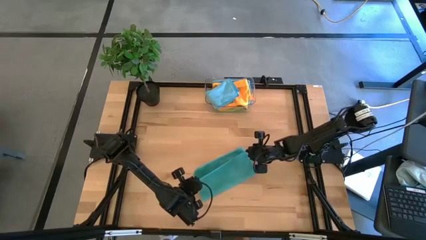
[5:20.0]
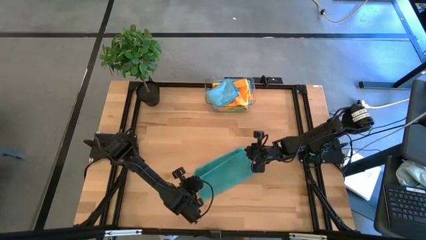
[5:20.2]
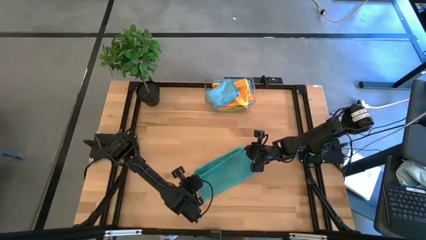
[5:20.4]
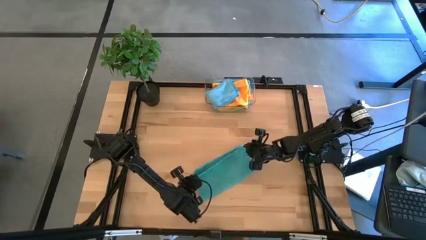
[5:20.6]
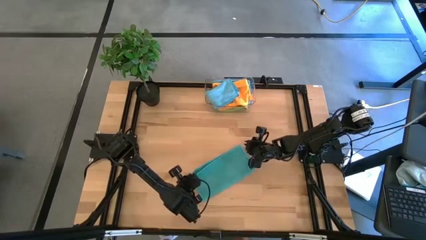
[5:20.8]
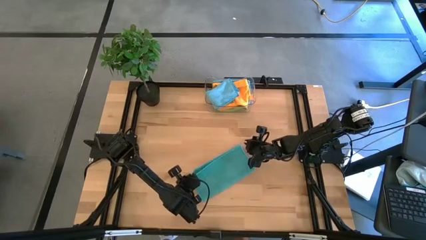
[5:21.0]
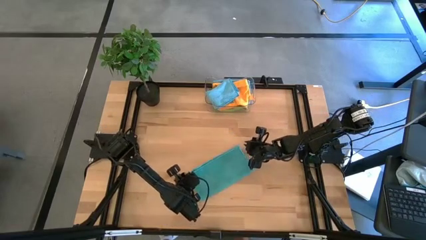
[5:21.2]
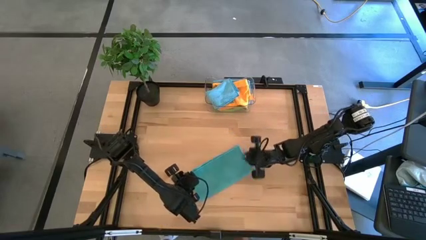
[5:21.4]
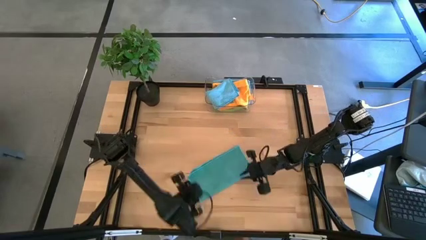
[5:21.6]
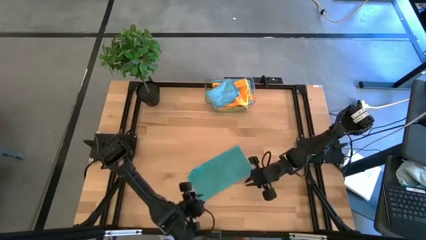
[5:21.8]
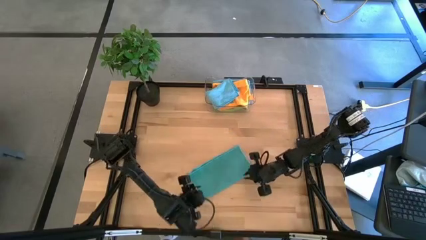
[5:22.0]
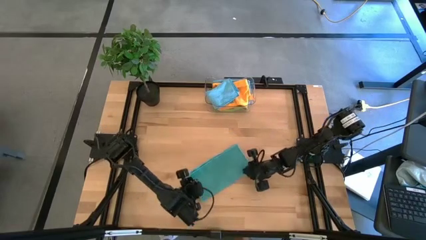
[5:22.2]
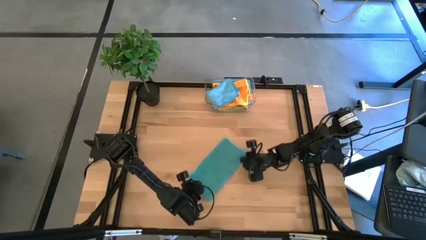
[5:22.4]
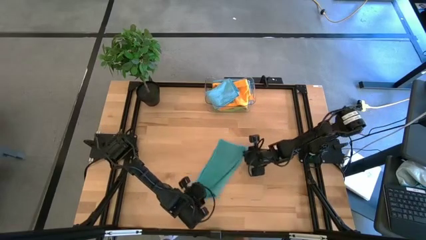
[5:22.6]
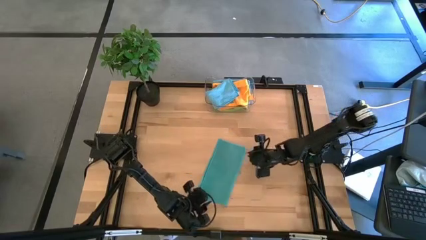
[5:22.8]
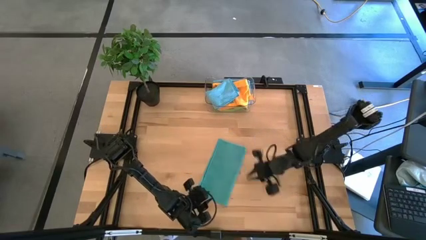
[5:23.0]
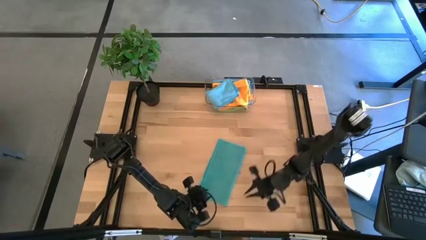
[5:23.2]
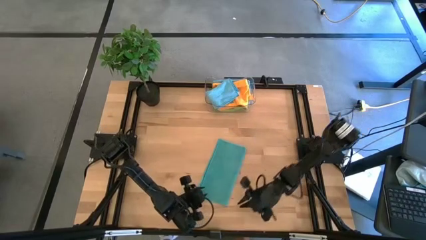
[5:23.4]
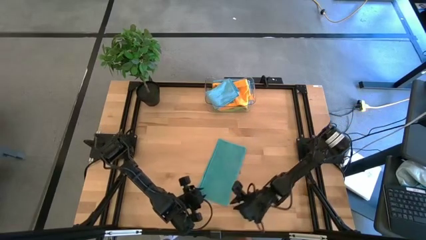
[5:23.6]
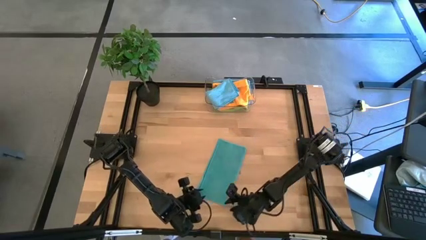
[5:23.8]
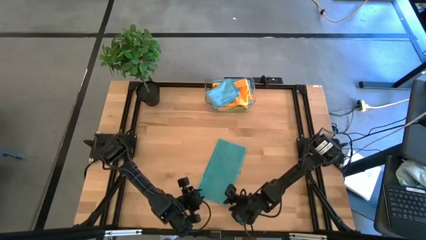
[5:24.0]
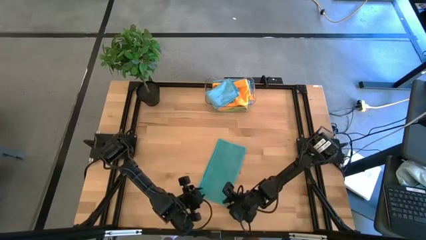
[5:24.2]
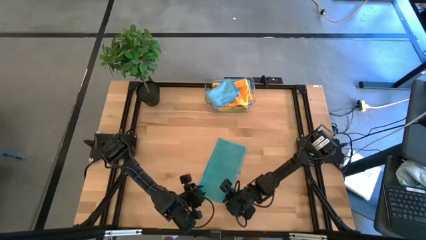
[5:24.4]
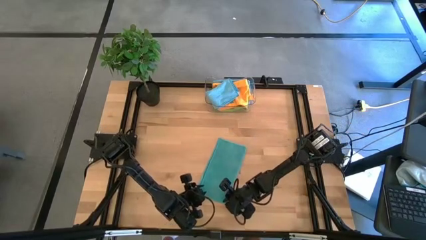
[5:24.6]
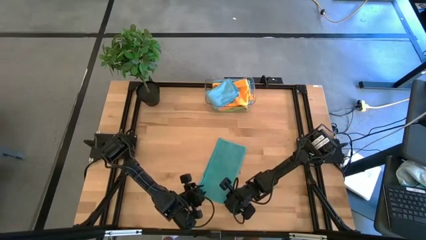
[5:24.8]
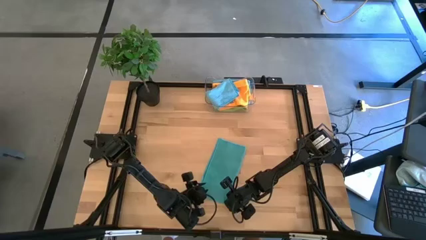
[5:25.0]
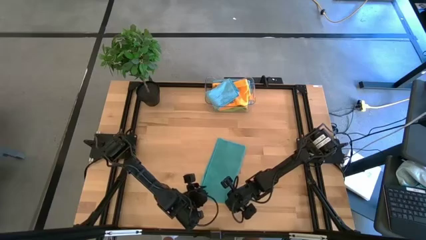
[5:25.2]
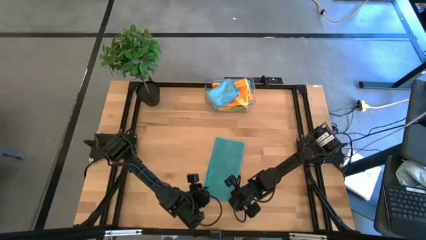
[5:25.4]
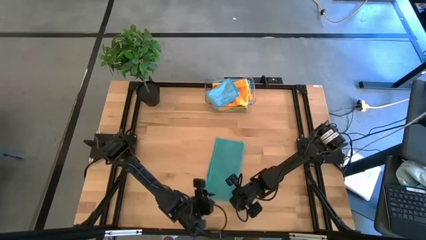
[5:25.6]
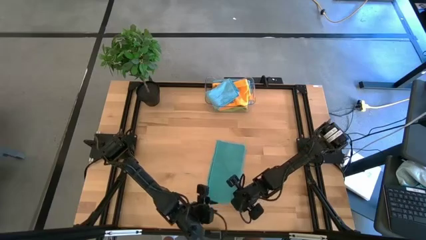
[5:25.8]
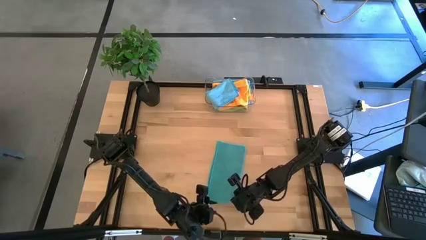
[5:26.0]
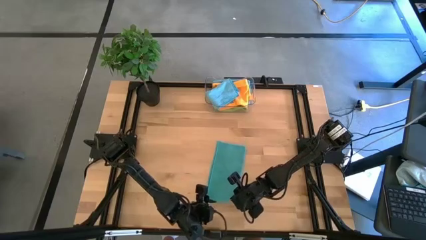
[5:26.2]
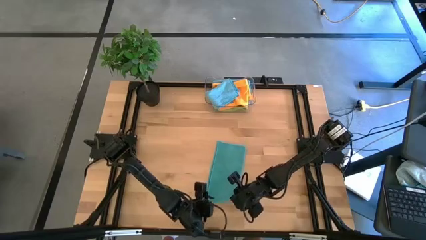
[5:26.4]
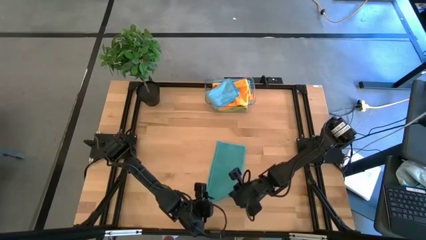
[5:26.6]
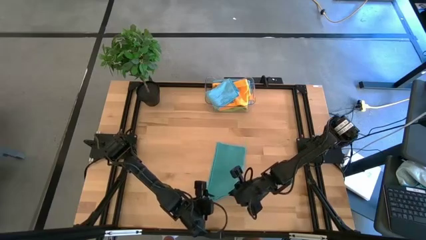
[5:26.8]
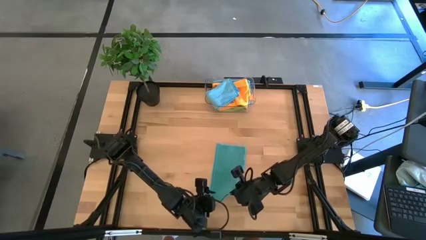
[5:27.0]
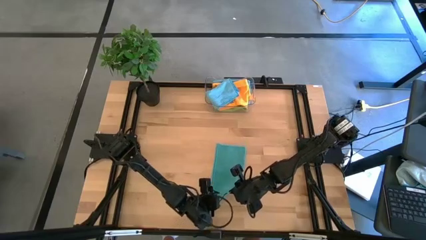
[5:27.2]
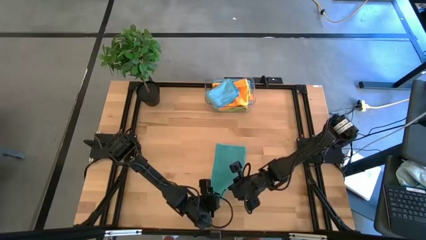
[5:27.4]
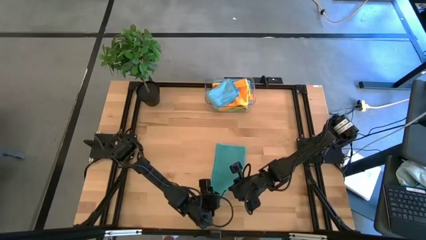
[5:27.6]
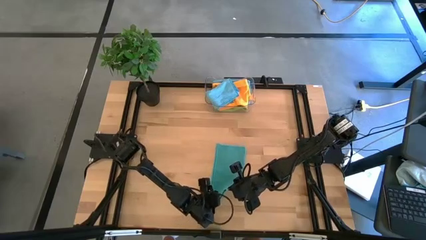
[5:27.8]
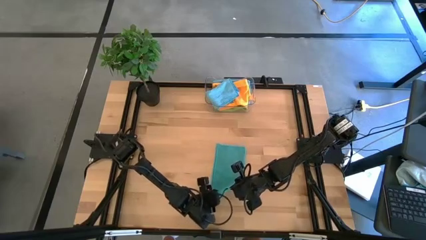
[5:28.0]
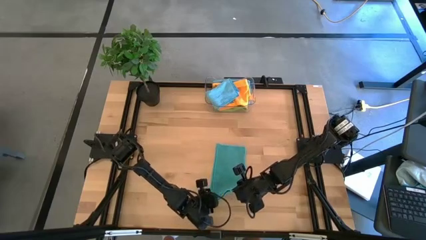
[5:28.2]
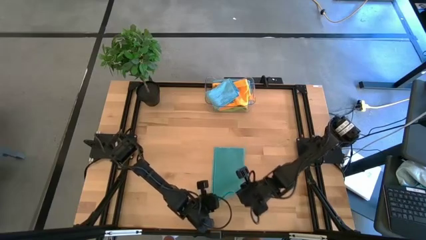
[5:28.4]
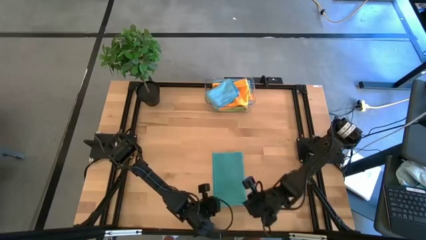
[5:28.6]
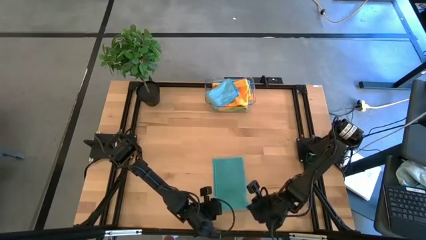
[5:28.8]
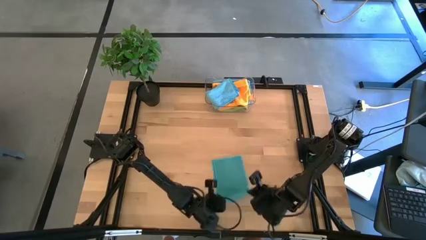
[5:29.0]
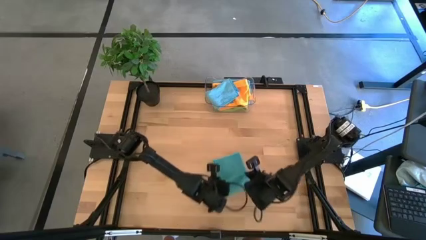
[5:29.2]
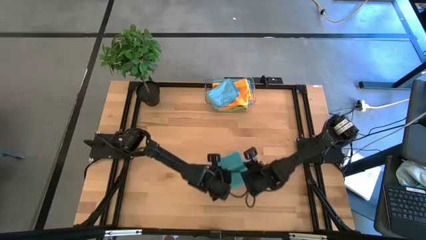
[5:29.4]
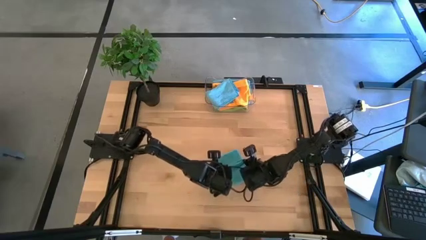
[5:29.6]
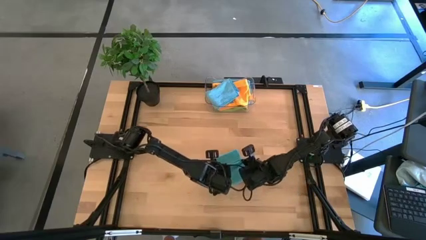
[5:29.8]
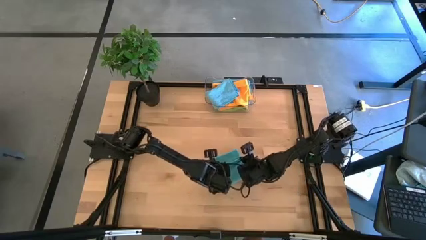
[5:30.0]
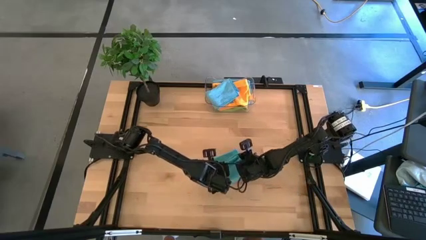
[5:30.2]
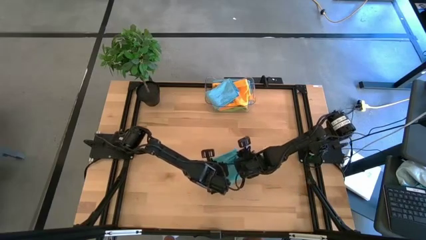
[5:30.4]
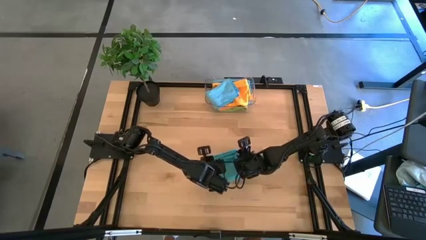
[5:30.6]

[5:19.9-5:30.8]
Task: Fold microfiber towels
Fold the blue microfiber towel

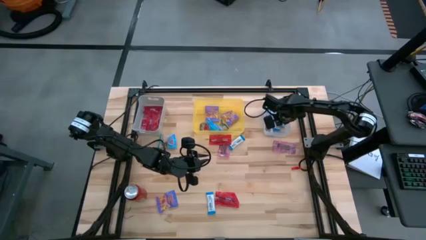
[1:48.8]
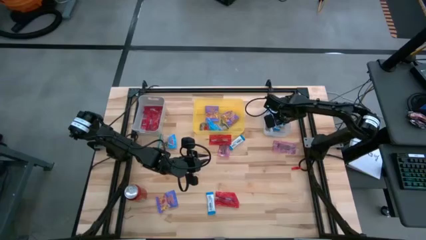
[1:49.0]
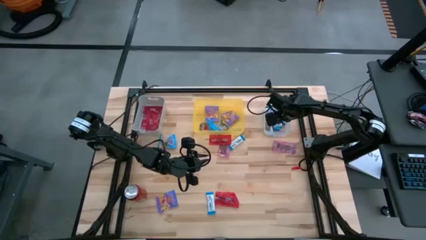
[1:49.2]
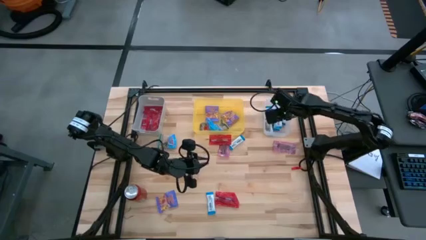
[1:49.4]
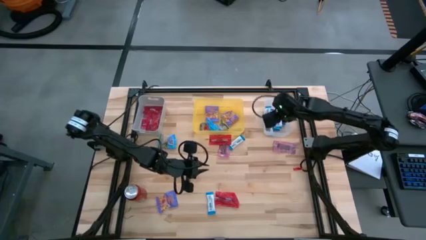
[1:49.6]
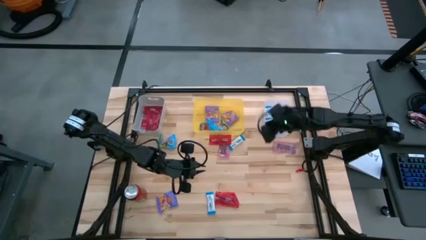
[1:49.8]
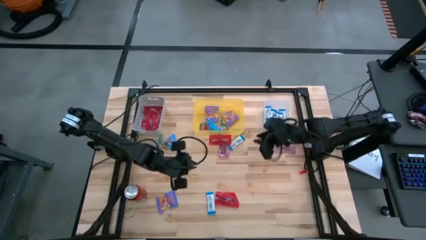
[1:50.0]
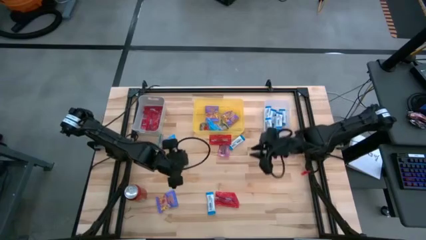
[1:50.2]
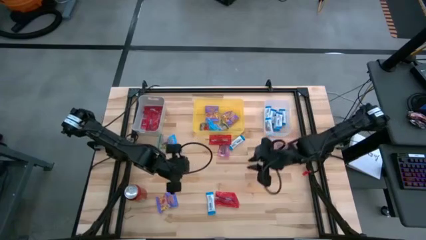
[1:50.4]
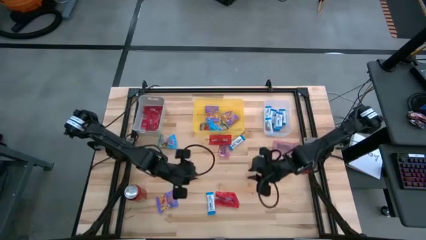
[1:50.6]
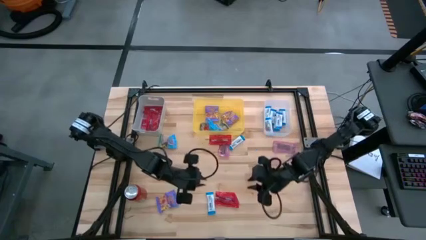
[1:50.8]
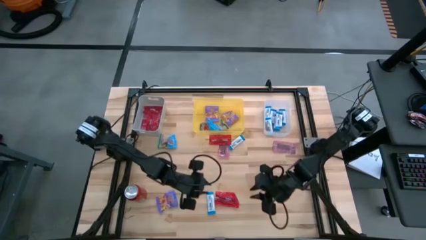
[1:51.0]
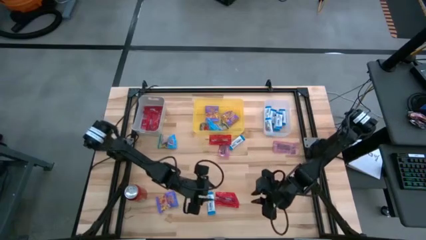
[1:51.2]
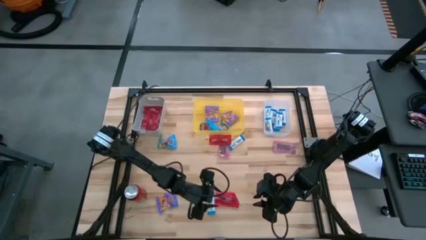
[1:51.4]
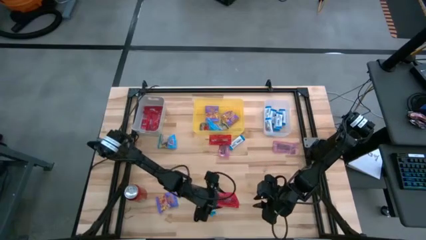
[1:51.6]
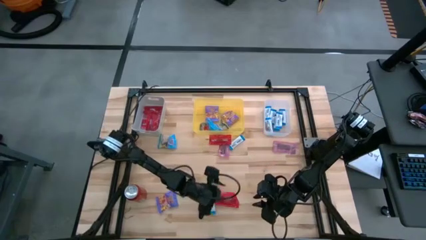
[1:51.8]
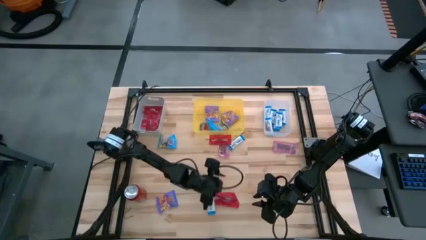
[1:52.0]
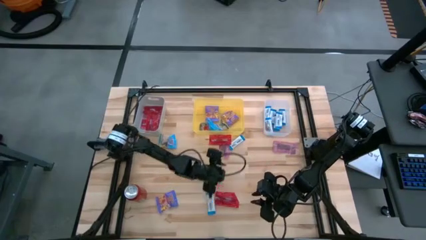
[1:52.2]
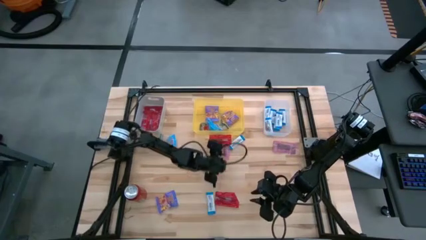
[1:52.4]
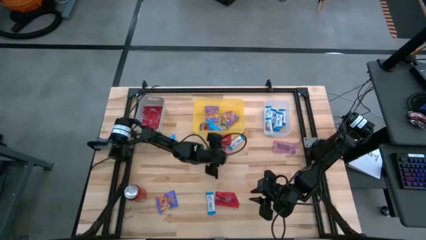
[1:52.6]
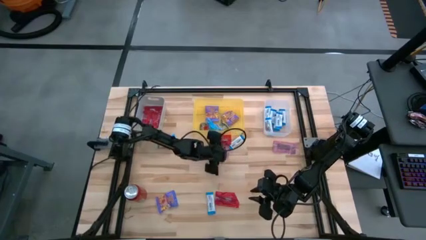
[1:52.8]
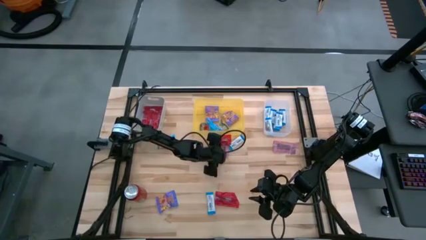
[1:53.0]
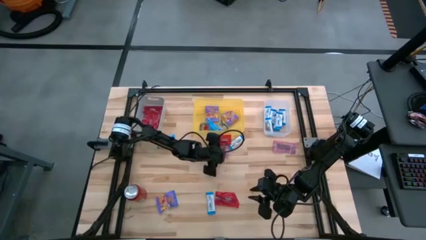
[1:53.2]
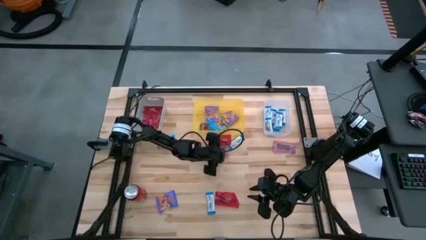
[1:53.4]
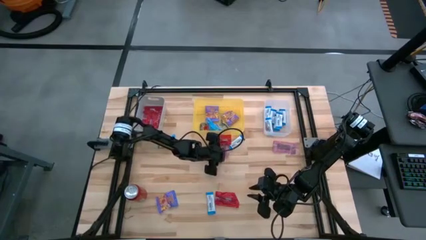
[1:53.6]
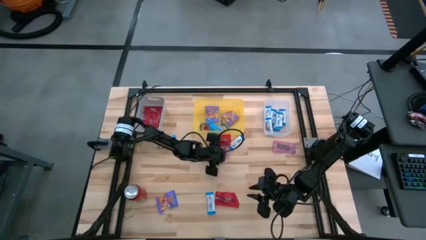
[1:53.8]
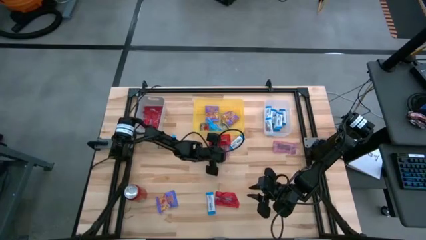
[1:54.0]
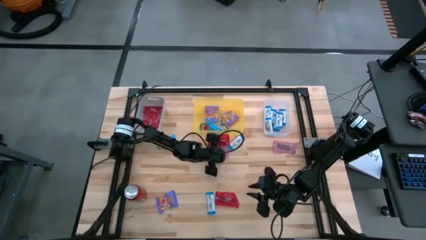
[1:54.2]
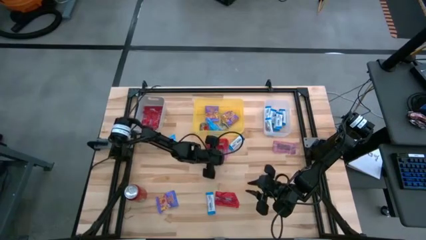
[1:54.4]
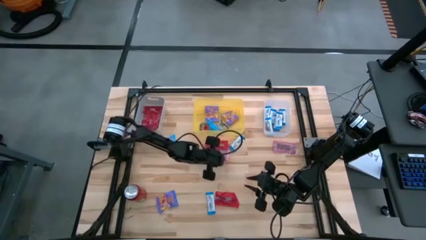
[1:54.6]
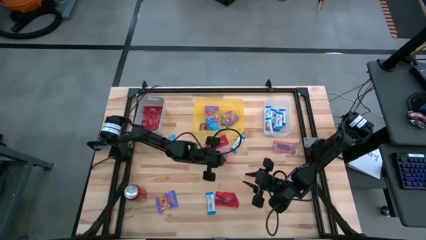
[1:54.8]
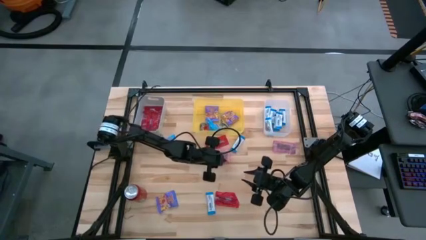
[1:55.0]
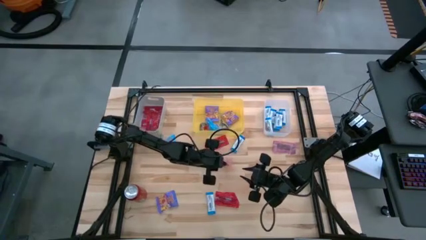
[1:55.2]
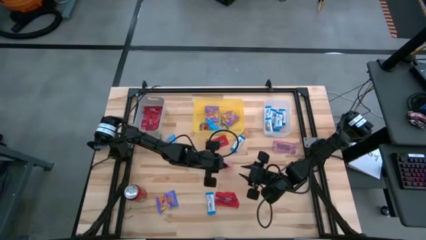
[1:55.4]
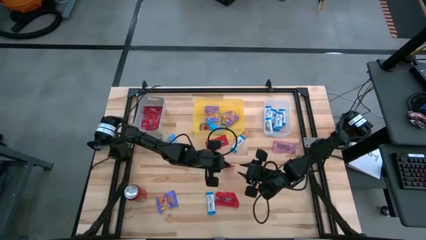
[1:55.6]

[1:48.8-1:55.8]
Task: Sort candy
Put the red gummy into the gray bin
